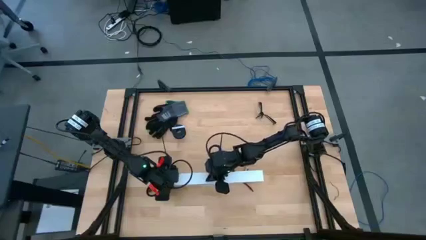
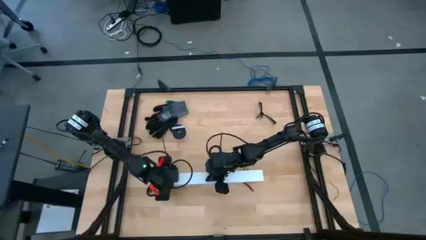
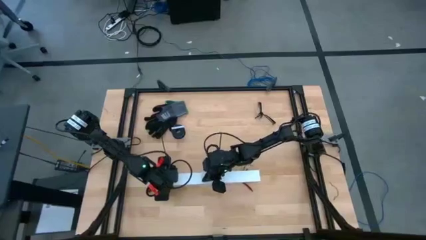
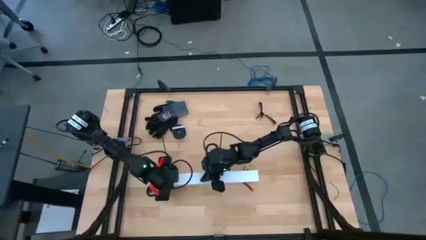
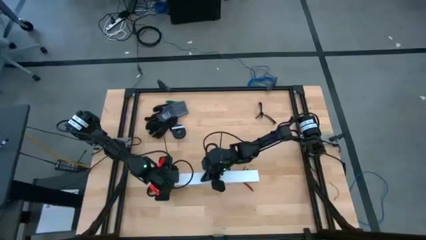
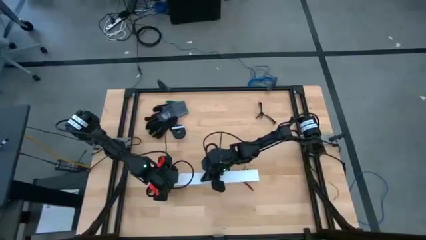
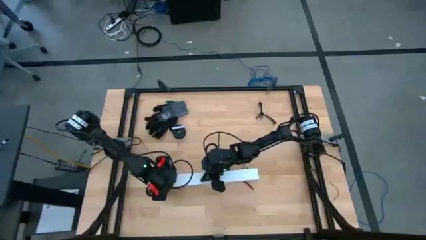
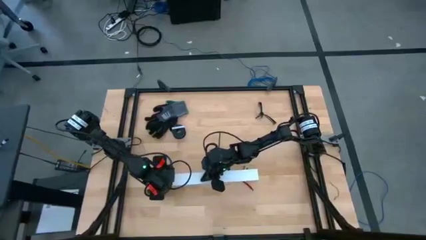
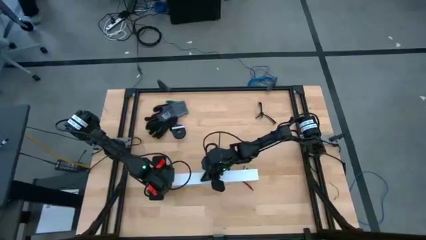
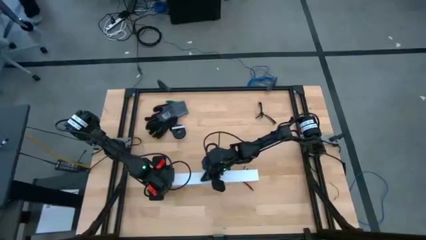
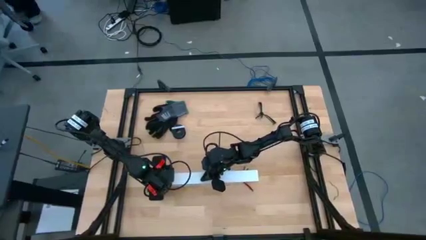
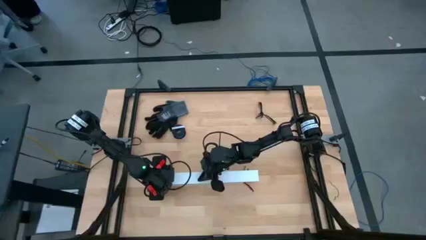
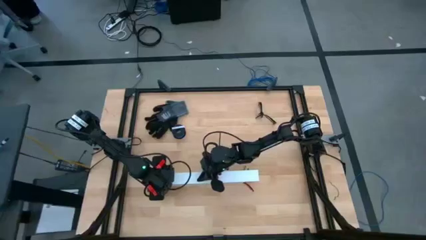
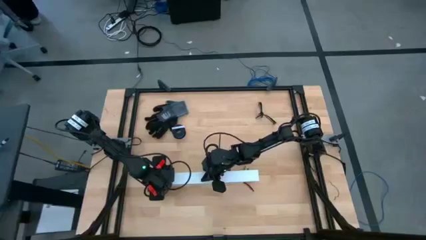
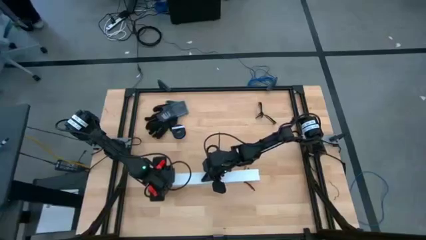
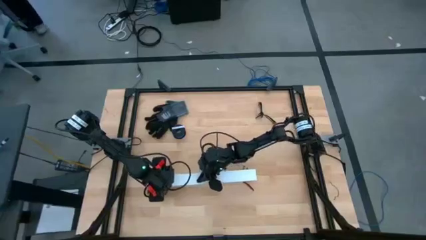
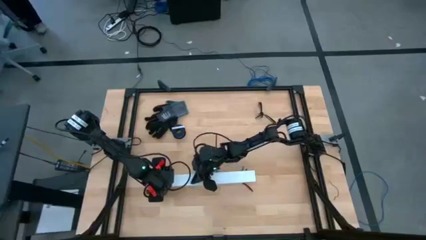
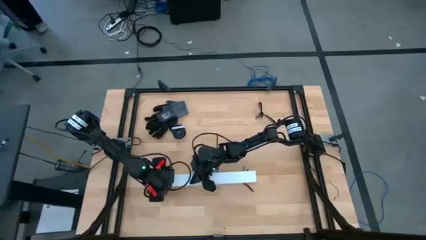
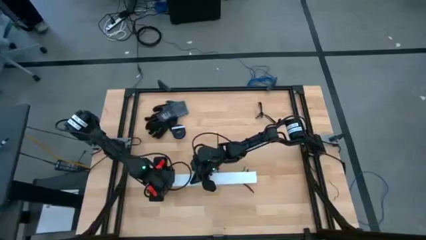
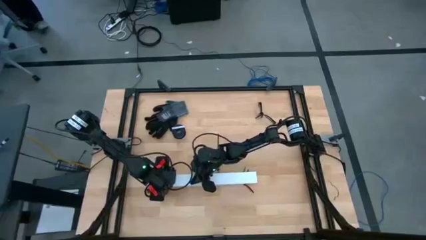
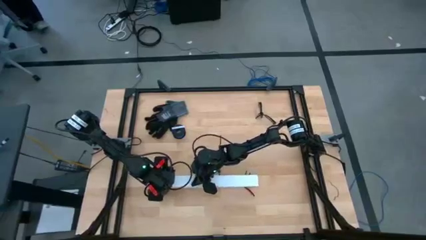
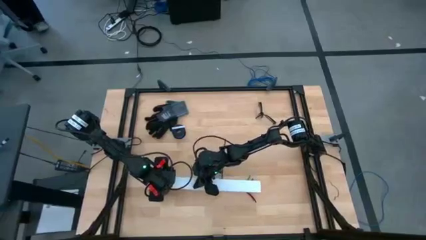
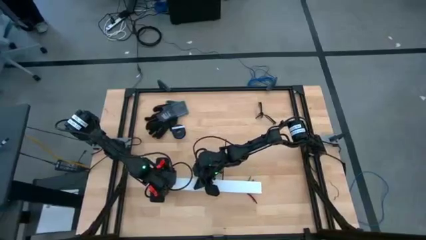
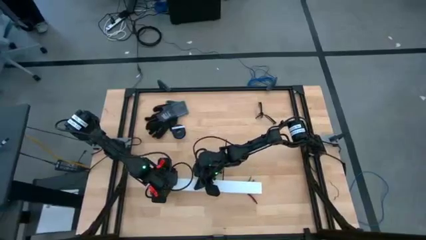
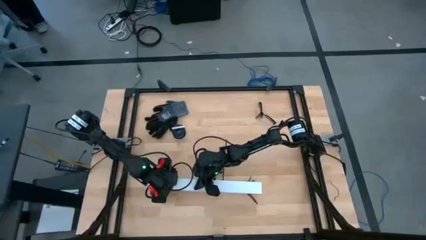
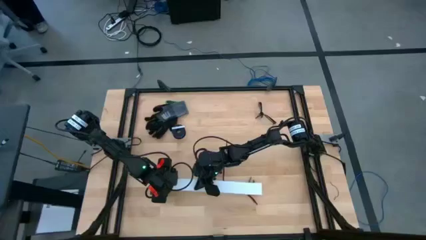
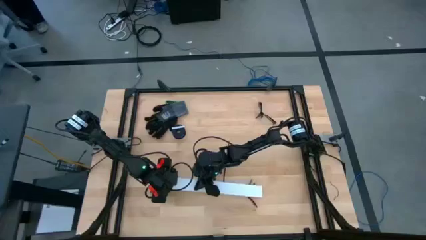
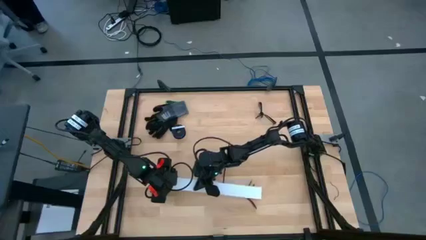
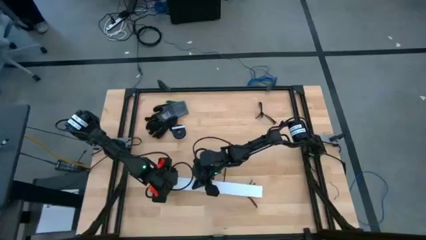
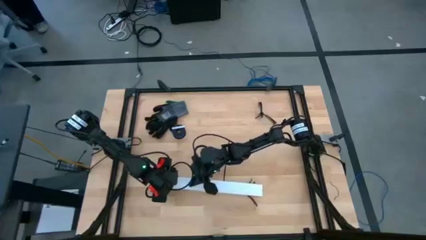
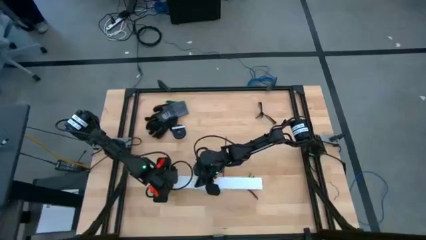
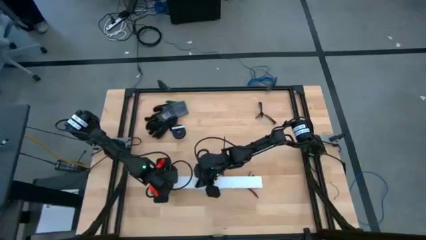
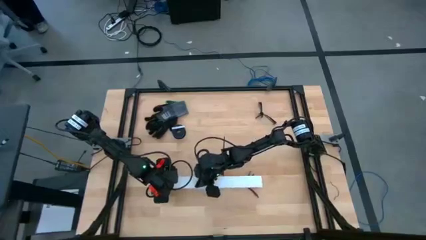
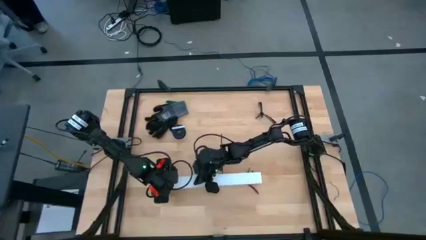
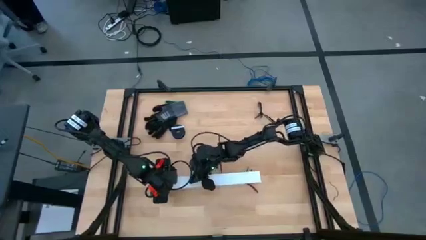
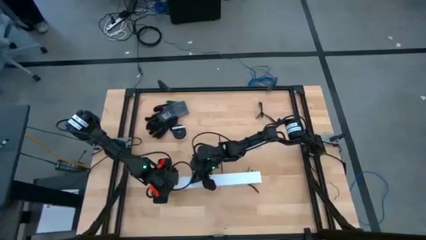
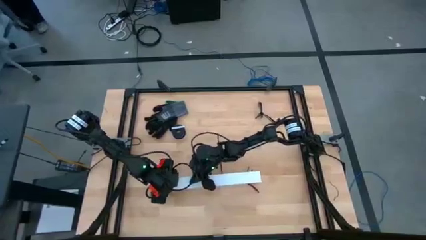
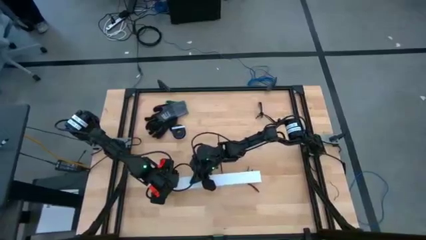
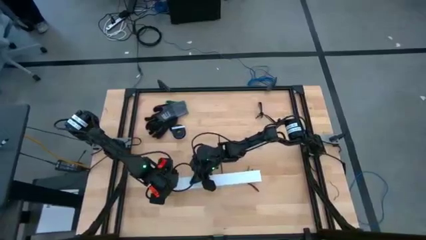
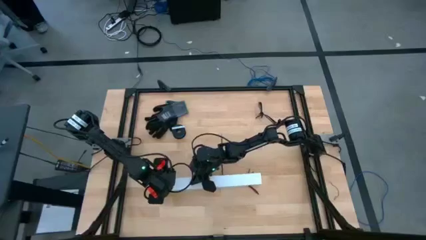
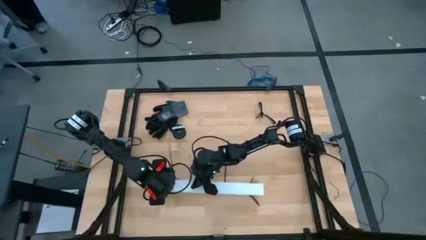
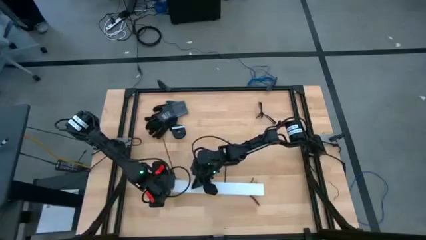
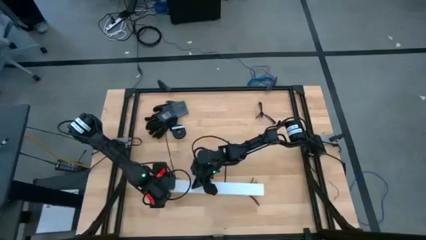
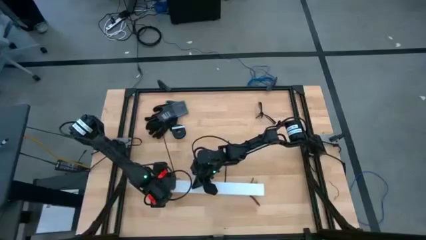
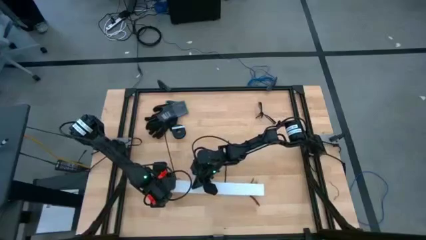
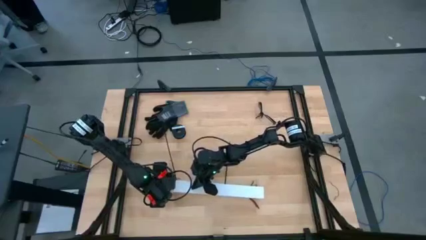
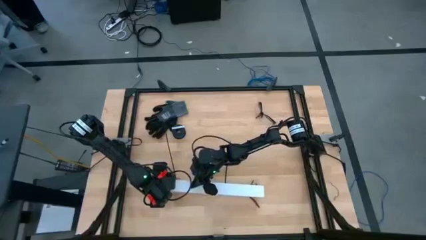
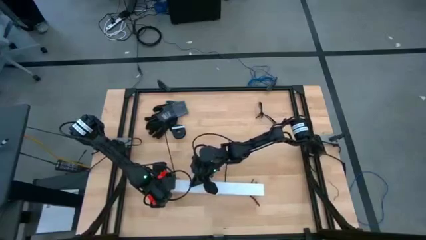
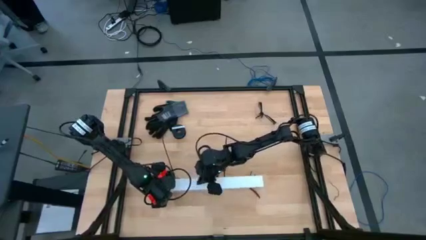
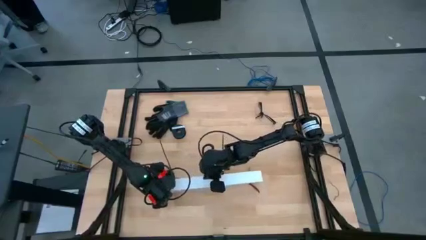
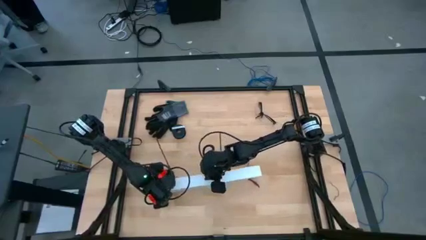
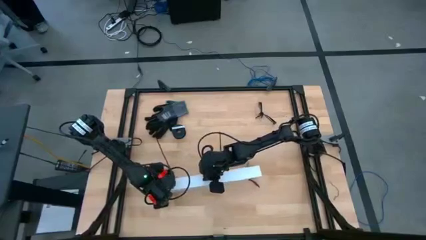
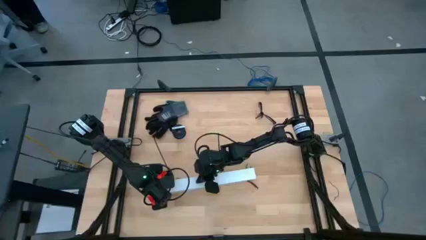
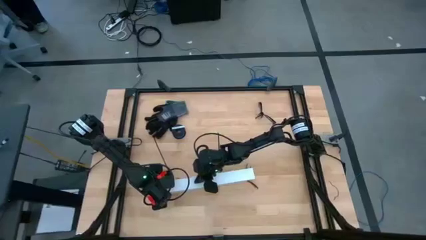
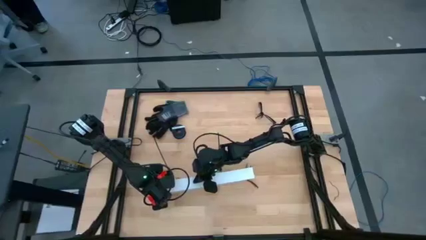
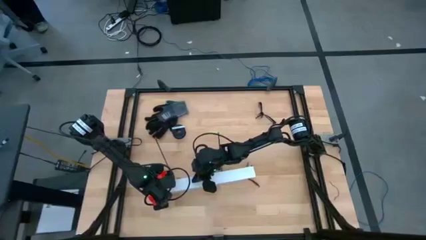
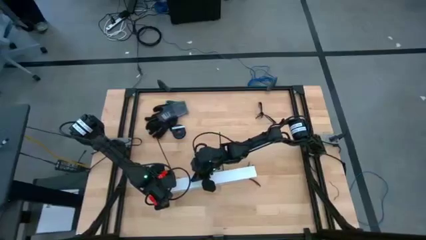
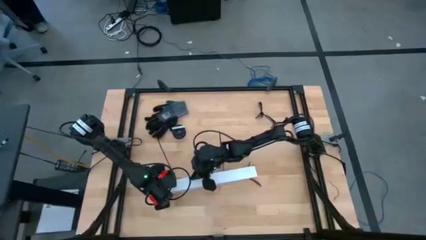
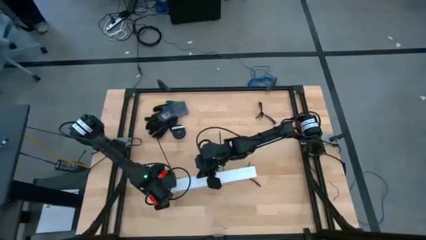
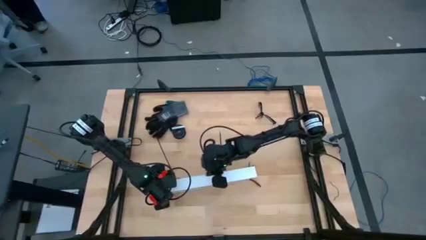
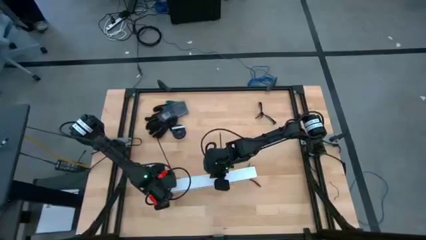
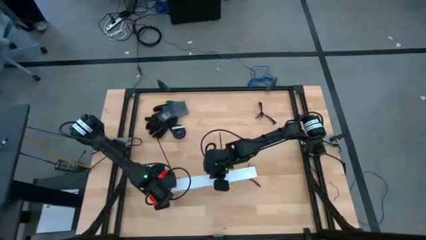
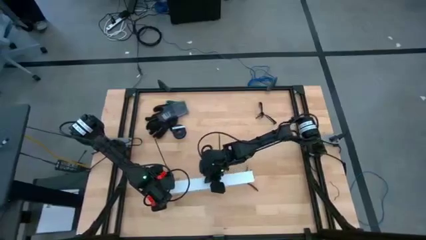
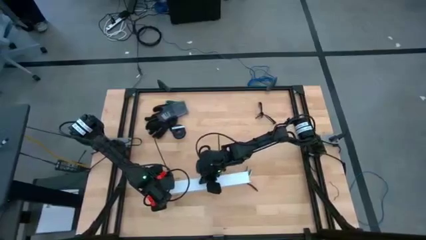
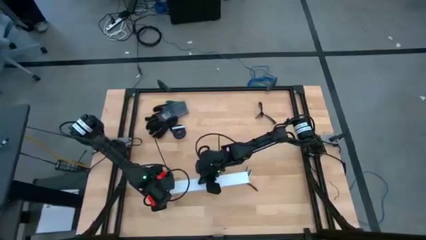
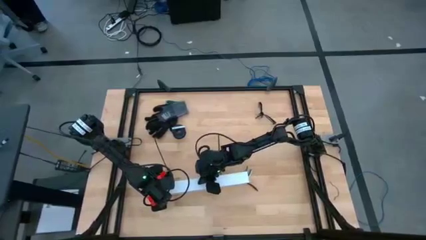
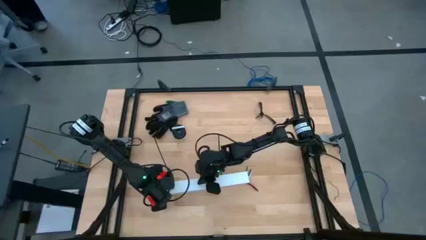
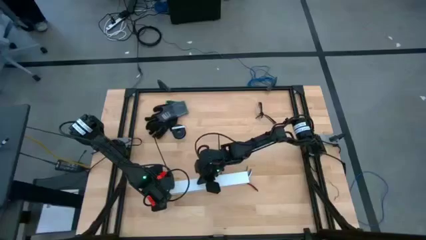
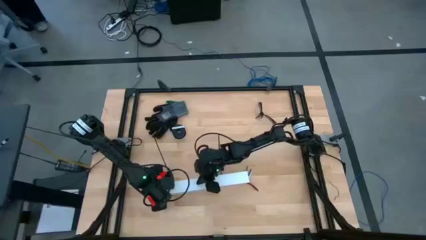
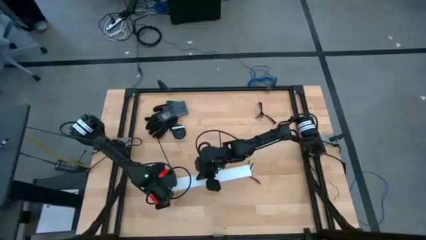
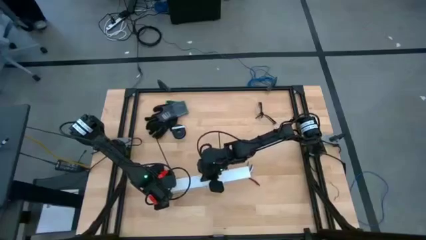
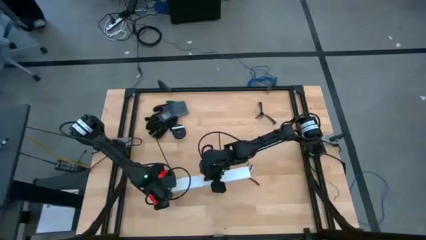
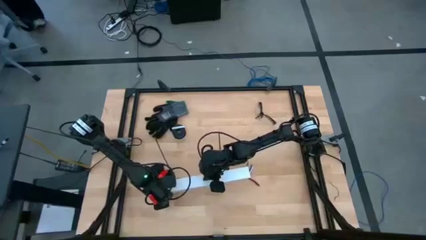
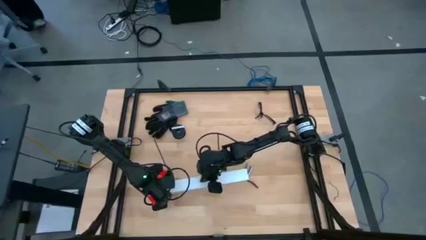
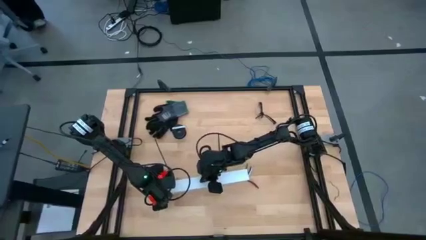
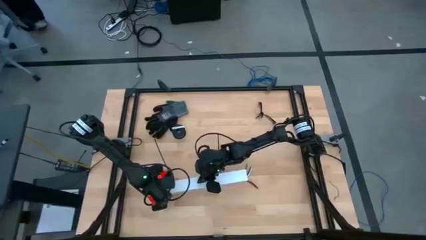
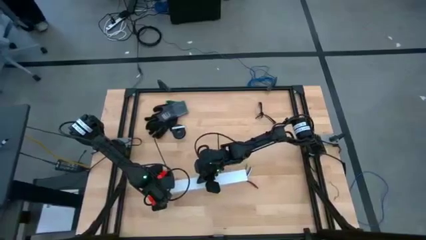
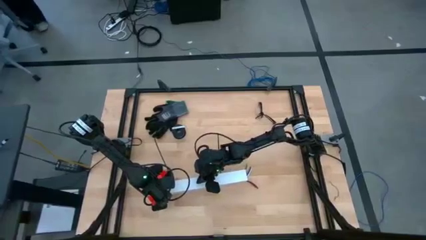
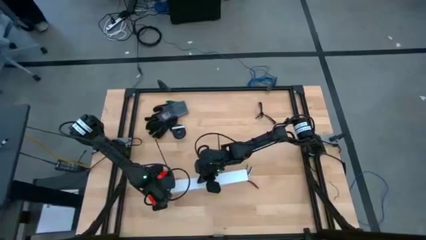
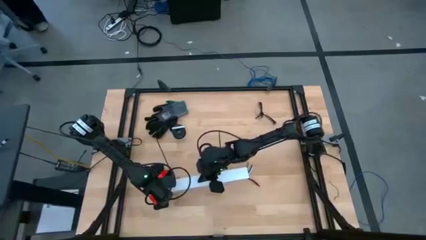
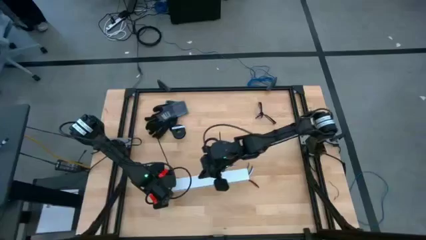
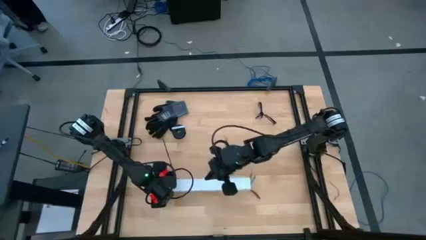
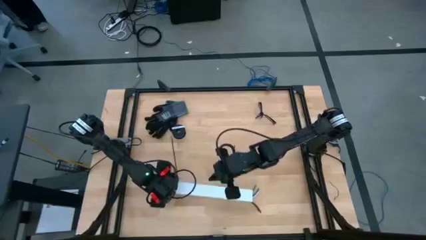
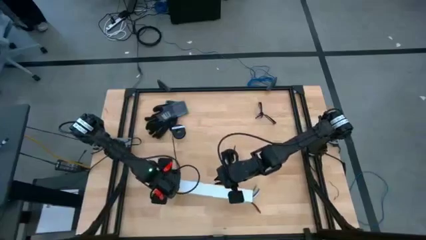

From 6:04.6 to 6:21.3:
Task: Ziptie cables
Close the white cable duct cover
